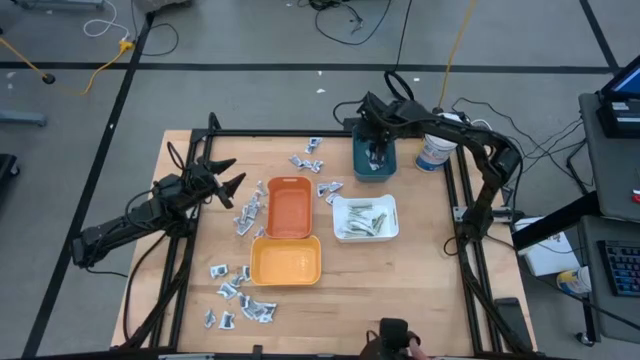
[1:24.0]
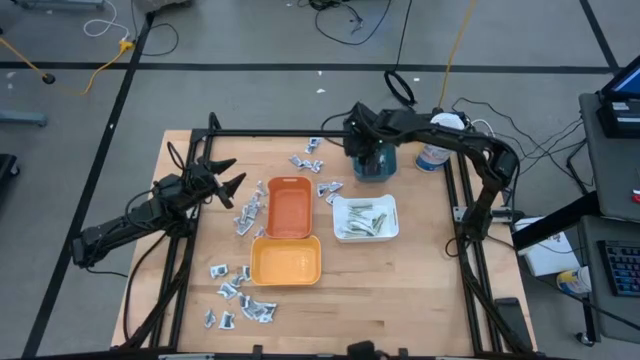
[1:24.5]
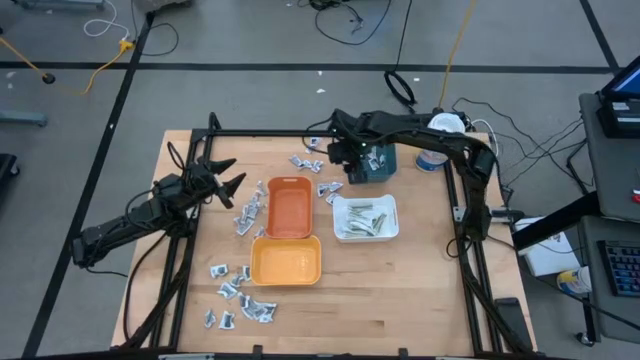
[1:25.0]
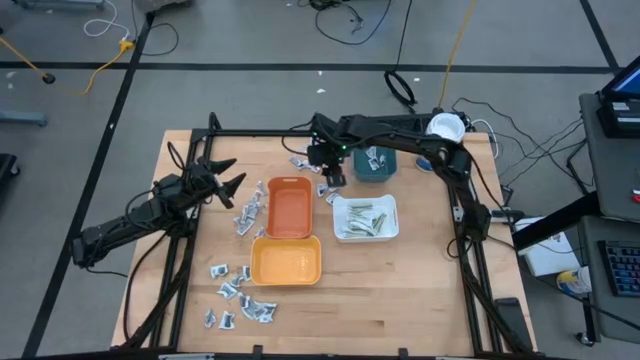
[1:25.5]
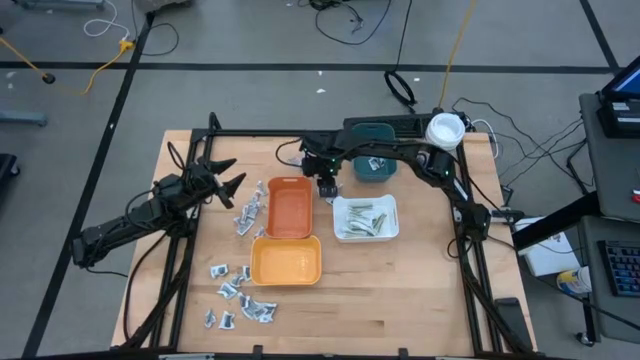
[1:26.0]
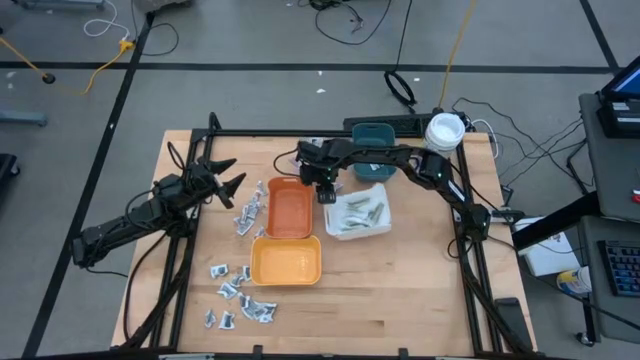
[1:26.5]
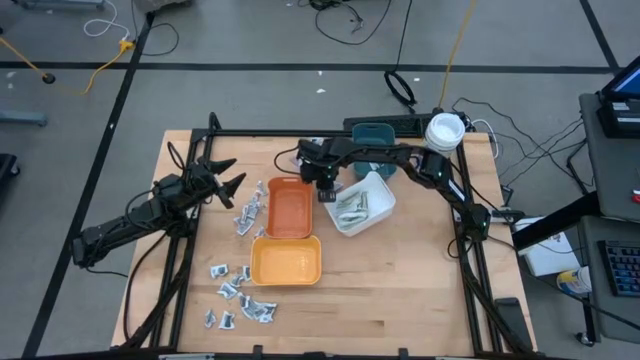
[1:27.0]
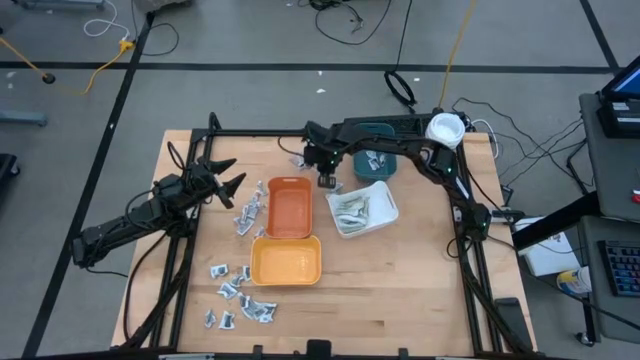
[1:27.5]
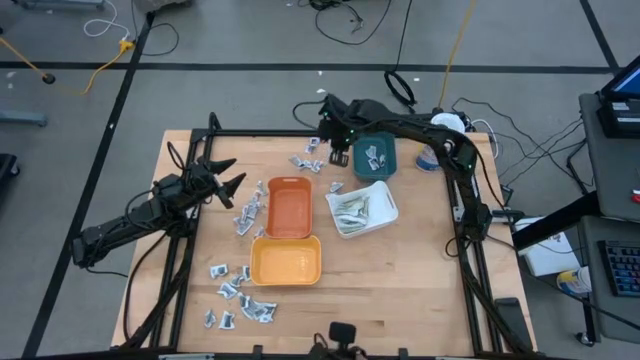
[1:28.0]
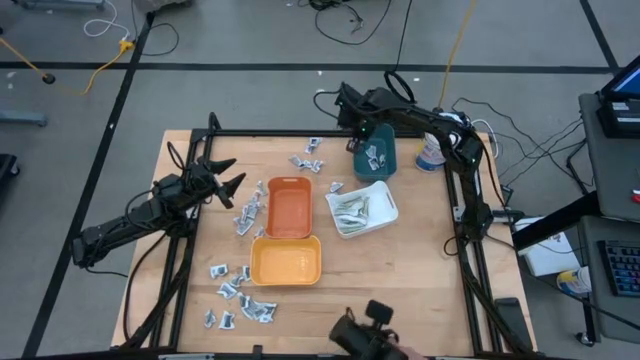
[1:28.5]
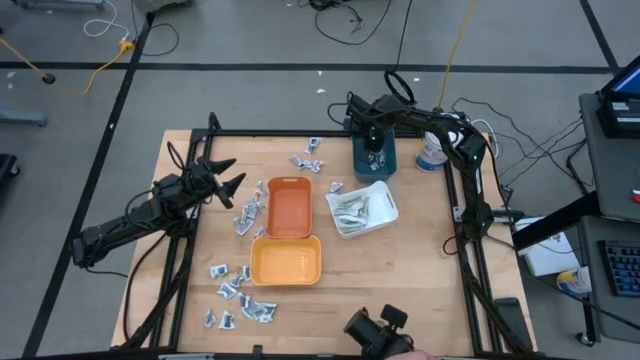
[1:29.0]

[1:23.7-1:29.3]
Task: Pick & Place First Aid Supplies
Put the blue sachet into the blue bin

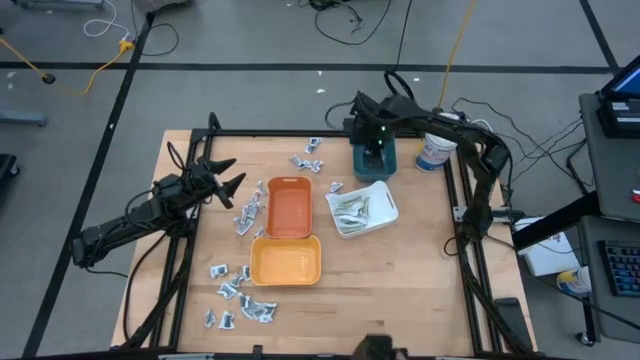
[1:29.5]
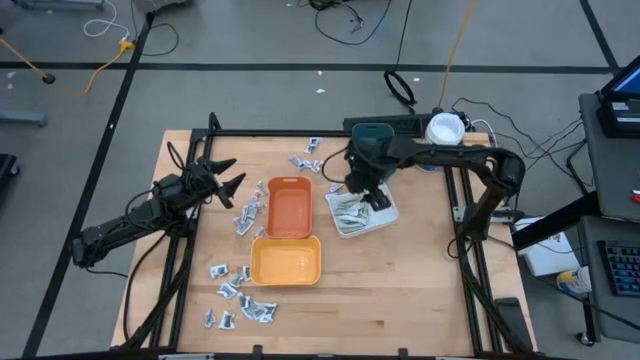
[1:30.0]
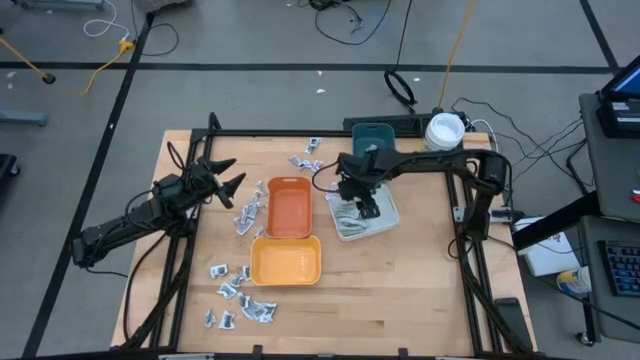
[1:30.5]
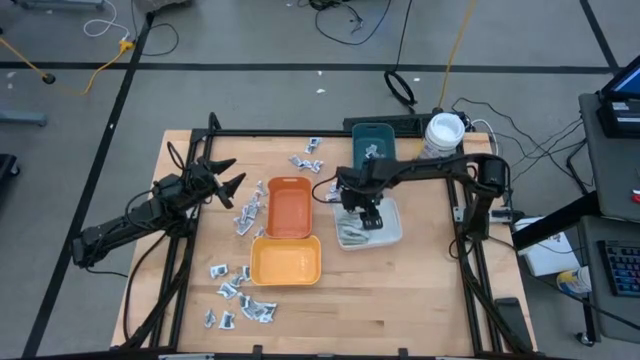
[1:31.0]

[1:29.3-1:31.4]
Adjust the white bin on the table

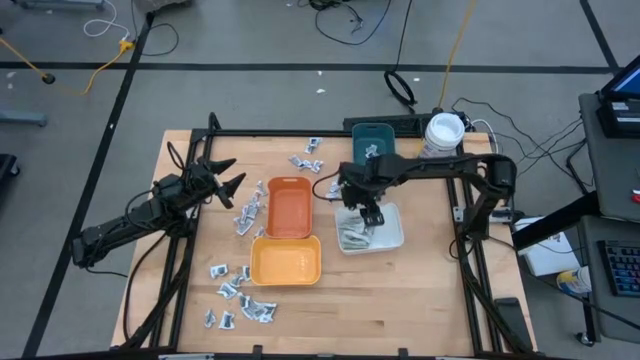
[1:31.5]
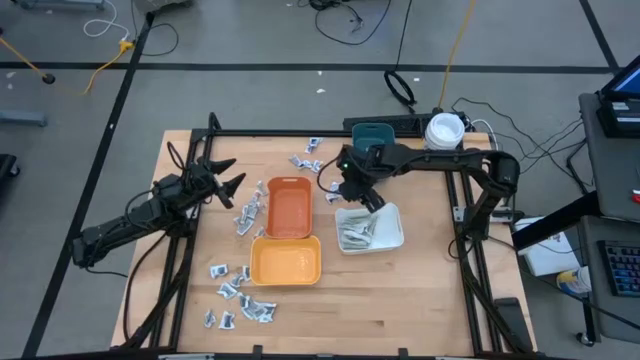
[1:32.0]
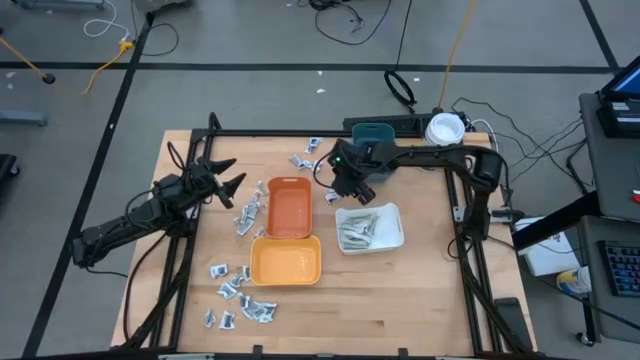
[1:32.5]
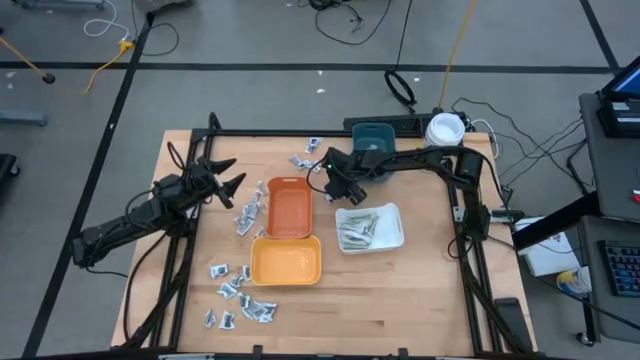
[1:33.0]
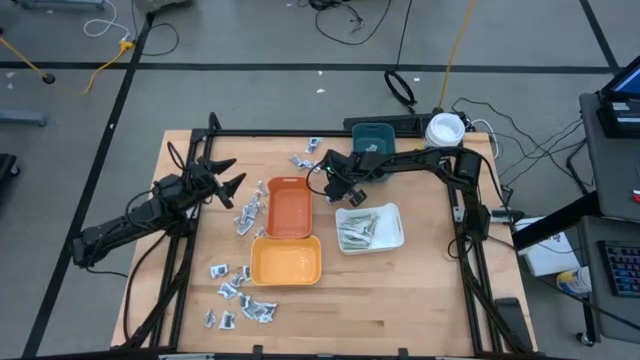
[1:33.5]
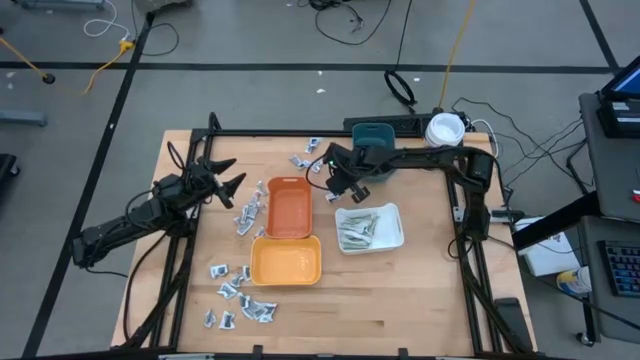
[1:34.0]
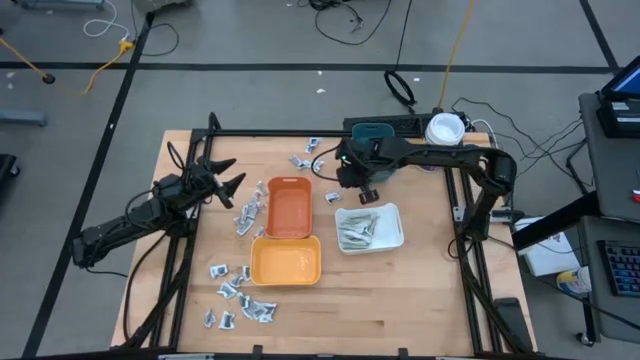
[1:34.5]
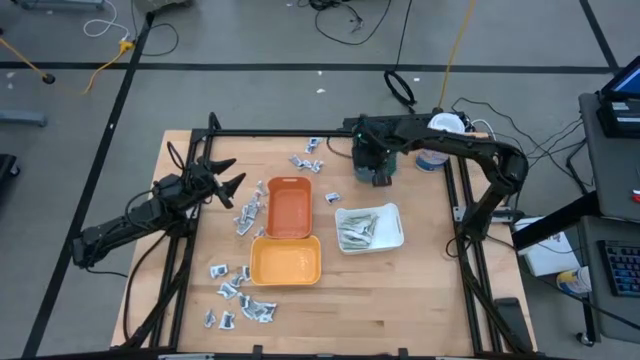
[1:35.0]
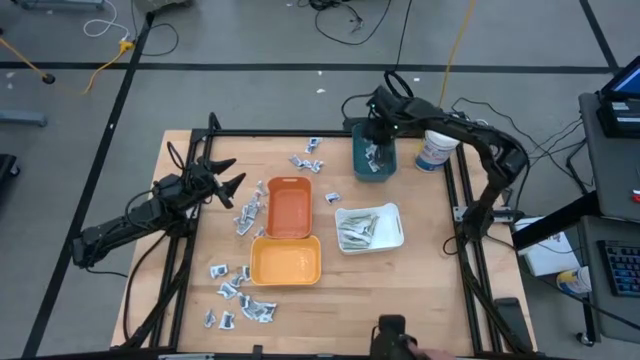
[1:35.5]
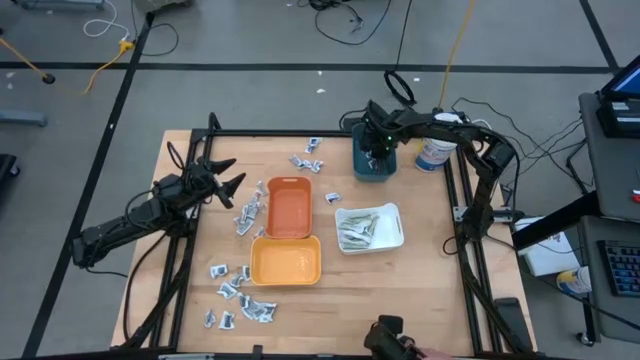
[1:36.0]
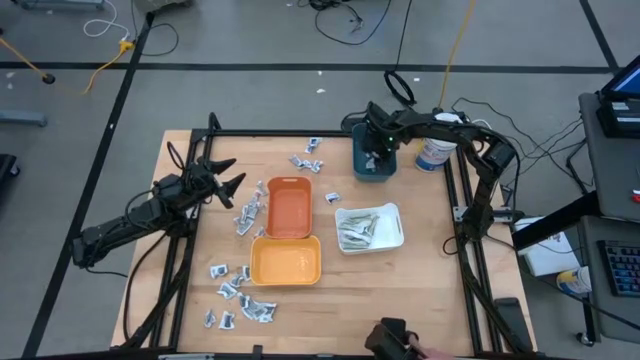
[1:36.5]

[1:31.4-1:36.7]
Put the blue sachet into the blue bin

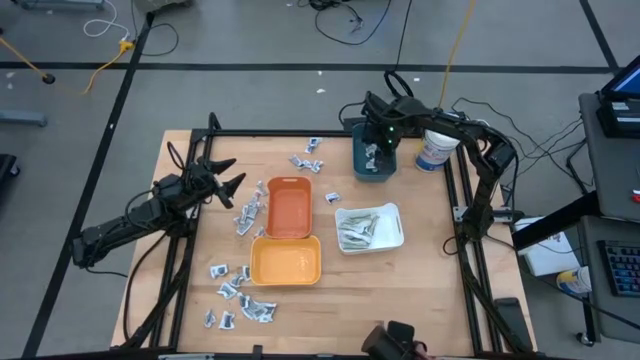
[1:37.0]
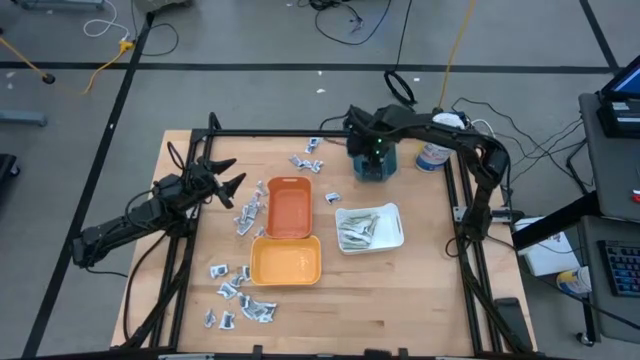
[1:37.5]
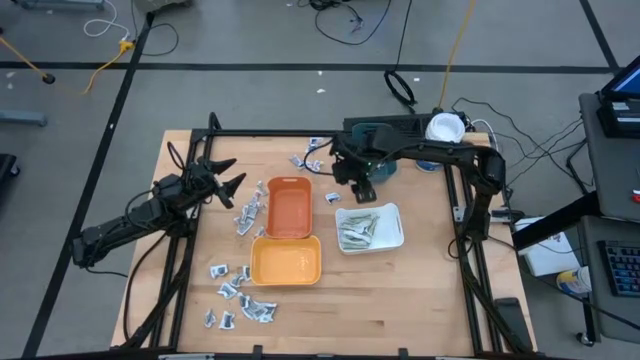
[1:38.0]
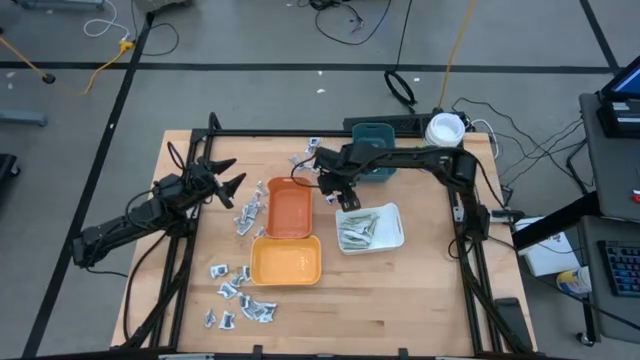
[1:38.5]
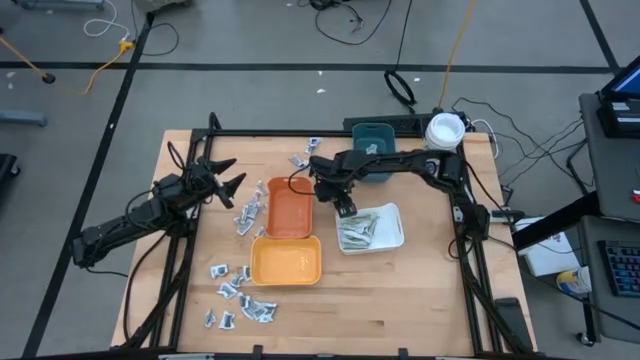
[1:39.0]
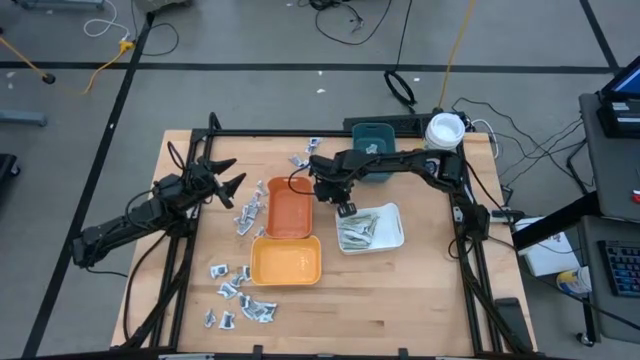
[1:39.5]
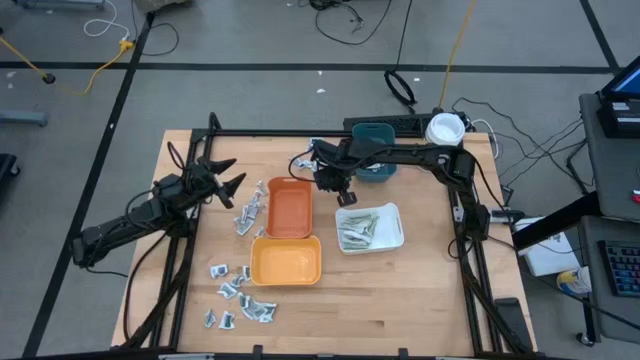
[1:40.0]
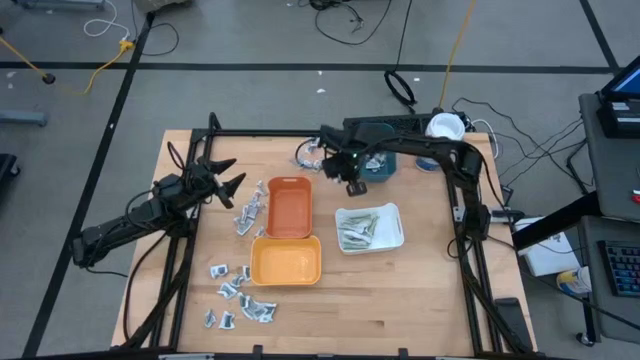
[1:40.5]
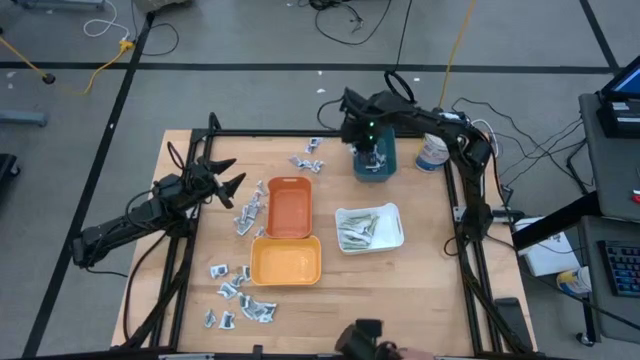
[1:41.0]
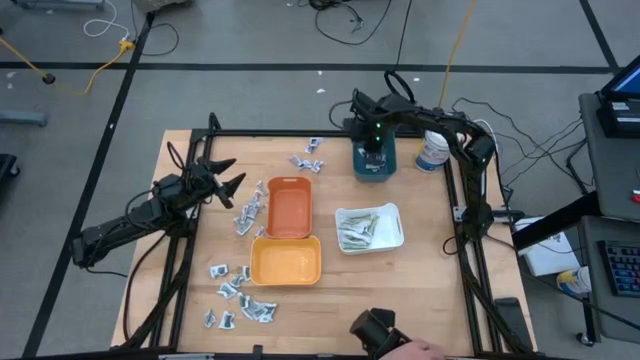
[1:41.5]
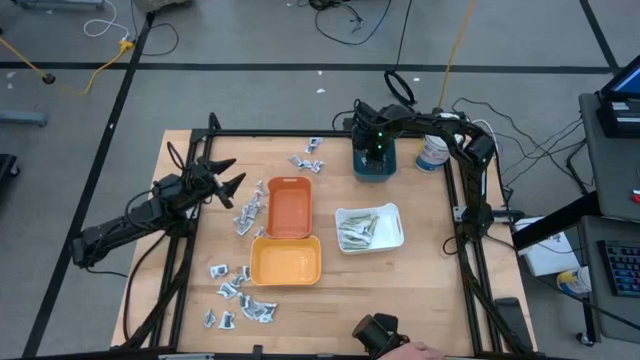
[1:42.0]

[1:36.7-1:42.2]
Put the blue sachet into the blue bin

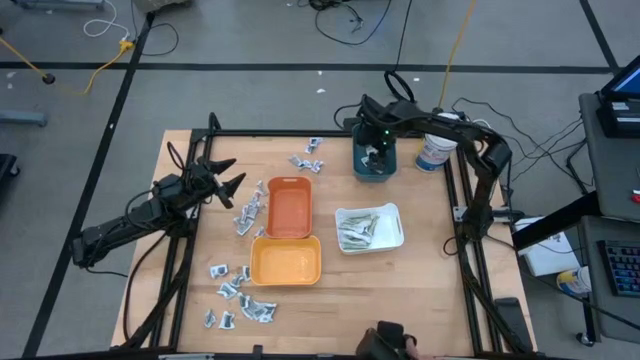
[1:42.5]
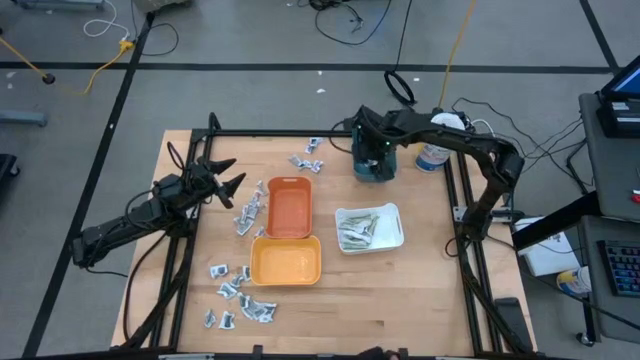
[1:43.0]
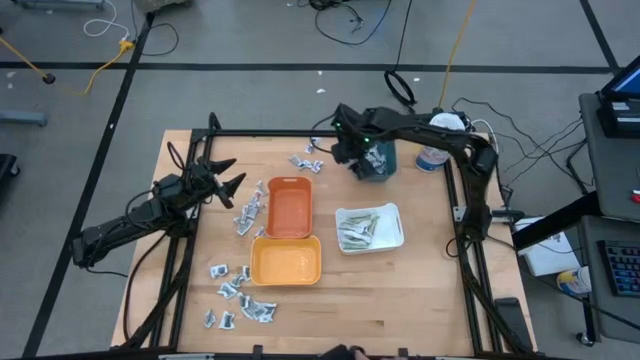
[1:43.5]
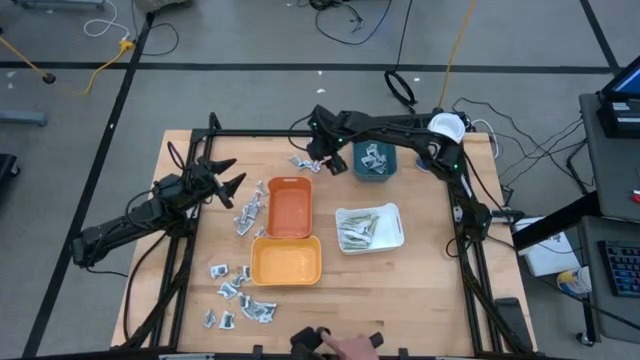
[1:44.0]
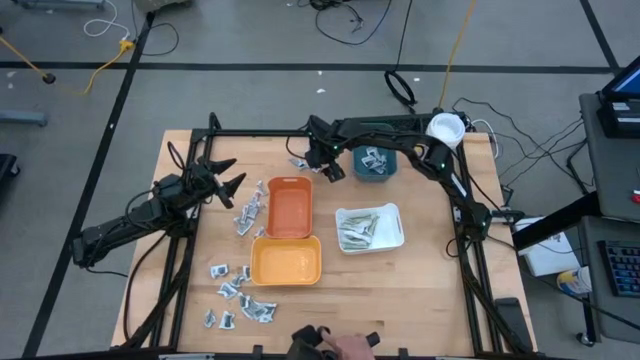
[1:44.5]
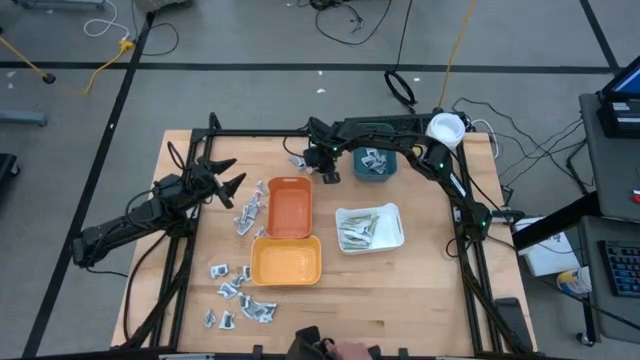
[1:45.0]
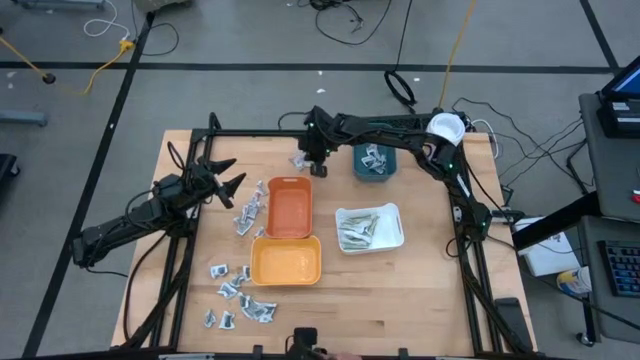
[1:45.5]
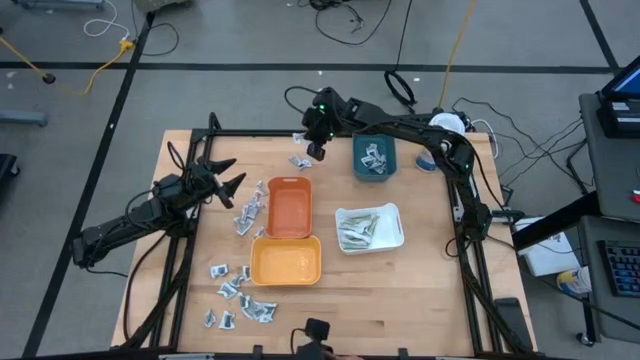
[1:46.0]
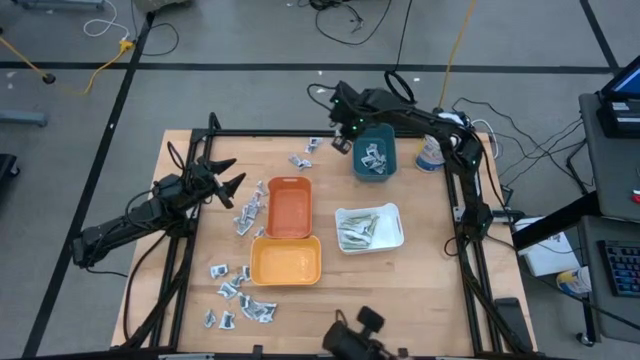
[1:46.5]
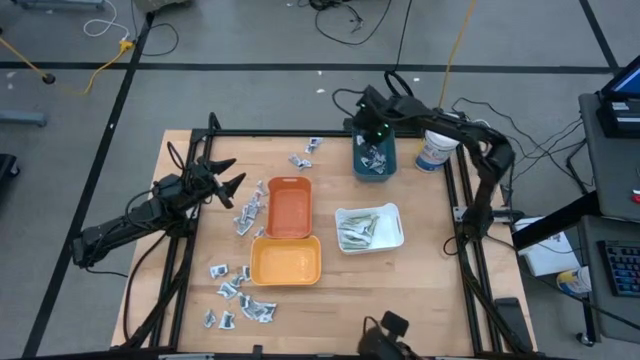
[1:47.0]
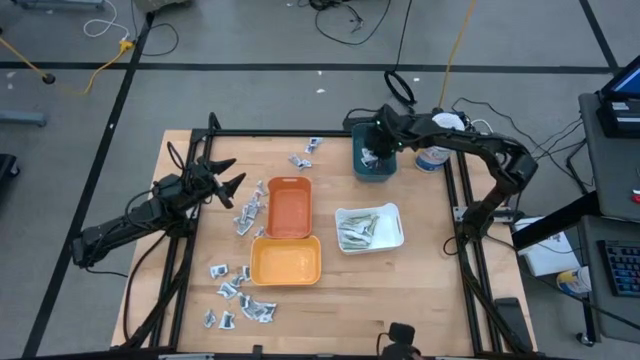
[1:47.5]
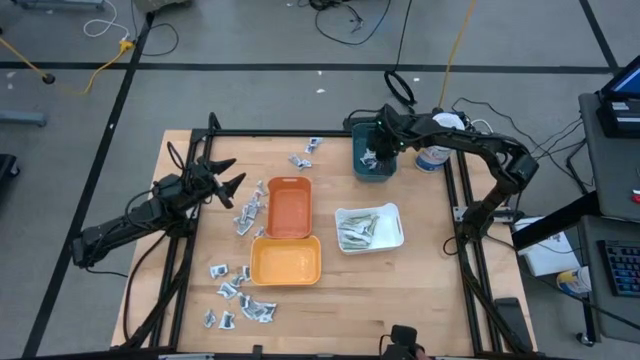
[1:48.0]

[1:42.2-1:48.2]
Put the blue sachet into the blue bin
